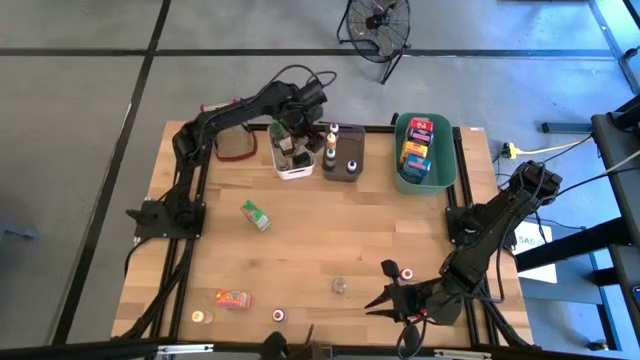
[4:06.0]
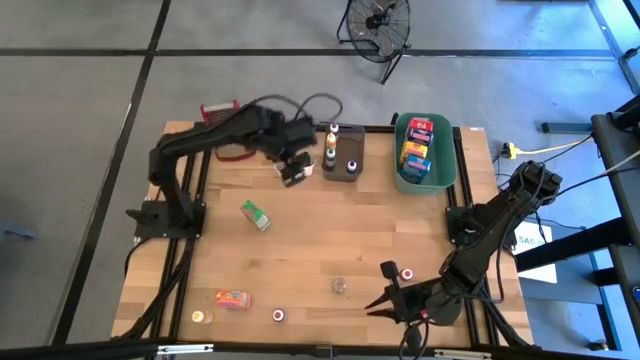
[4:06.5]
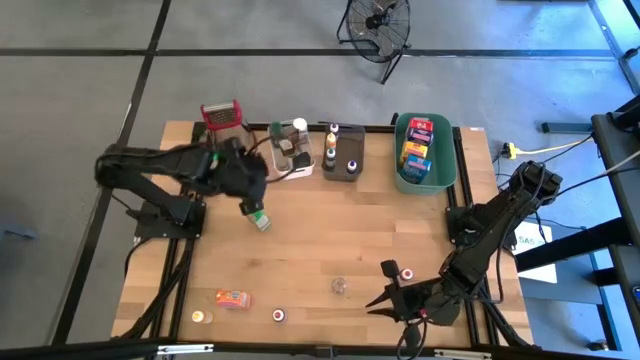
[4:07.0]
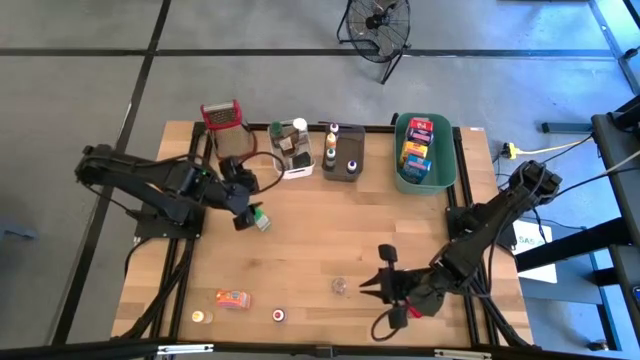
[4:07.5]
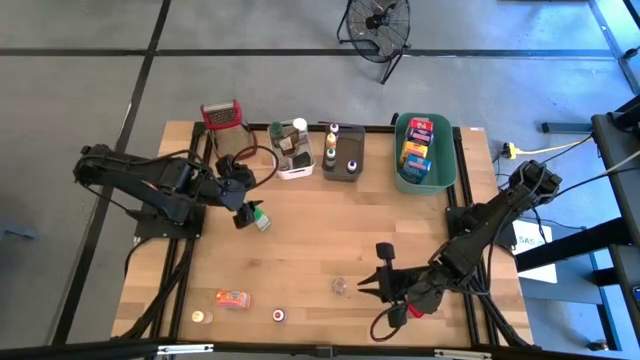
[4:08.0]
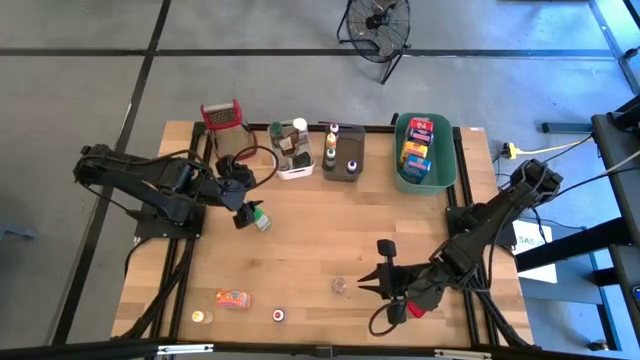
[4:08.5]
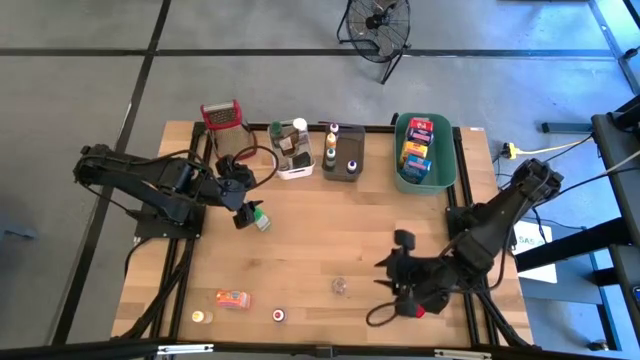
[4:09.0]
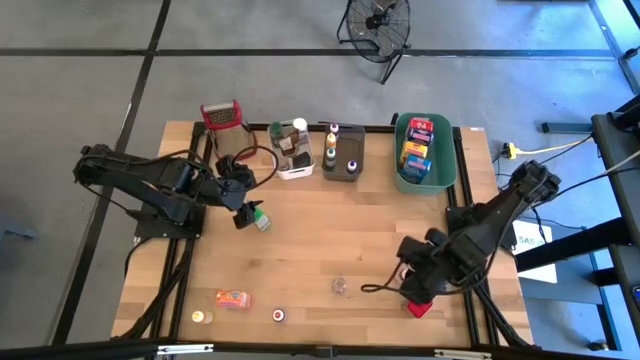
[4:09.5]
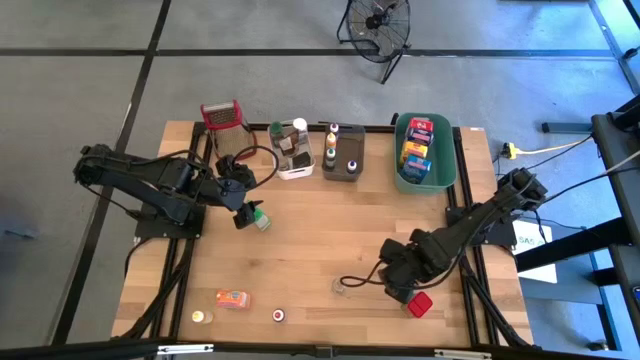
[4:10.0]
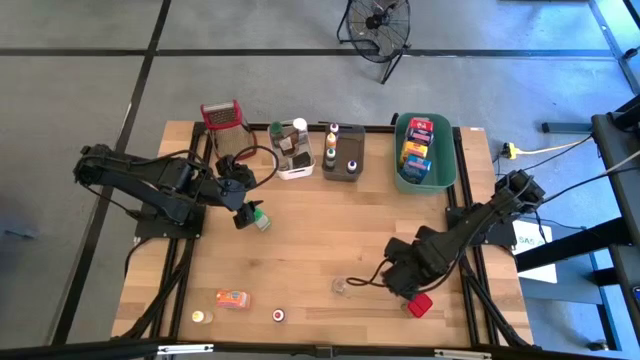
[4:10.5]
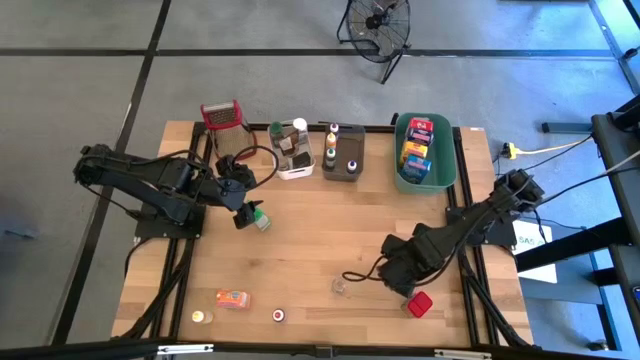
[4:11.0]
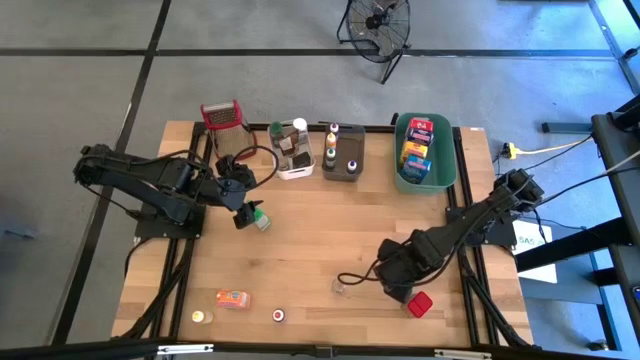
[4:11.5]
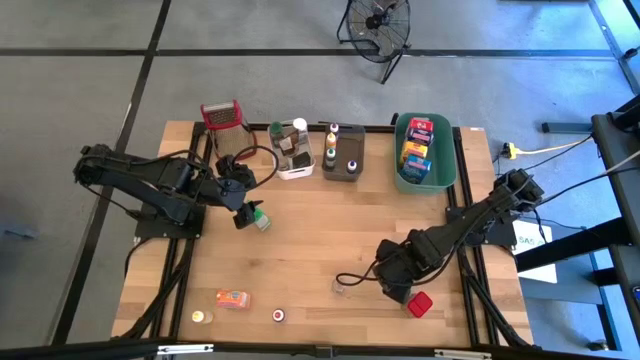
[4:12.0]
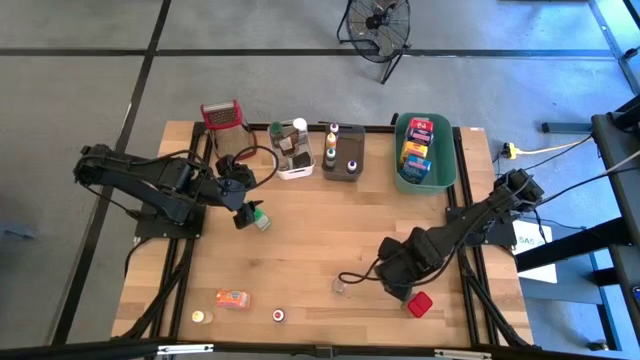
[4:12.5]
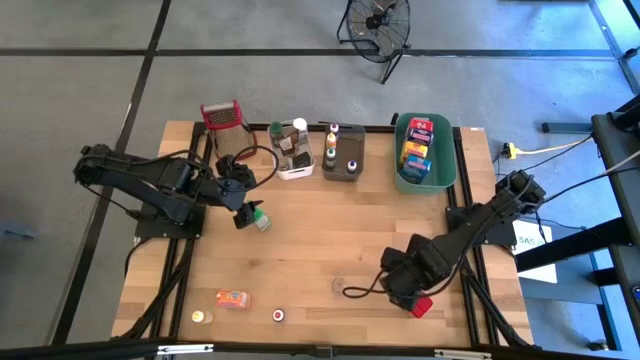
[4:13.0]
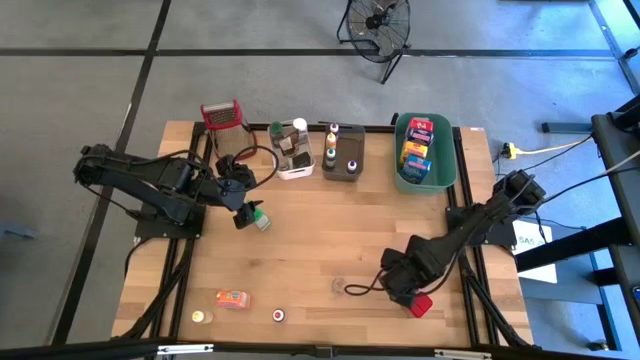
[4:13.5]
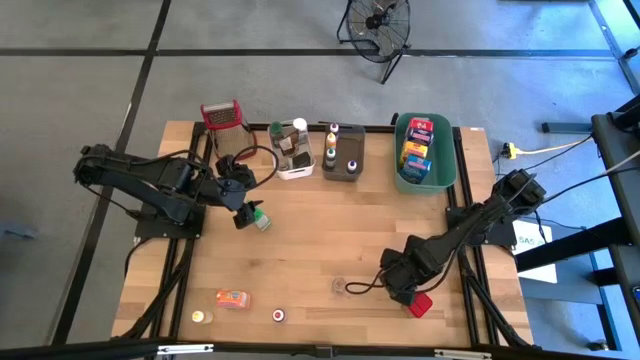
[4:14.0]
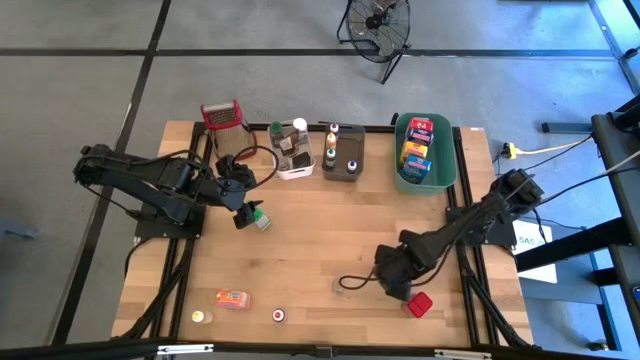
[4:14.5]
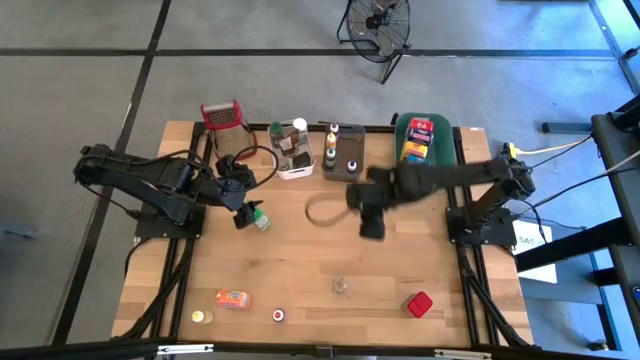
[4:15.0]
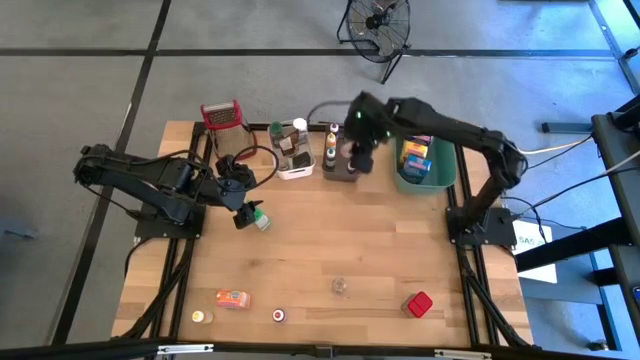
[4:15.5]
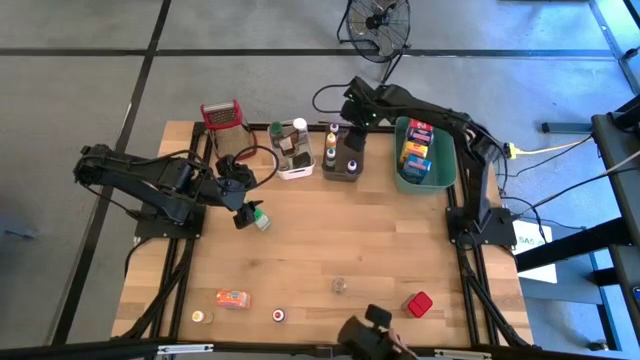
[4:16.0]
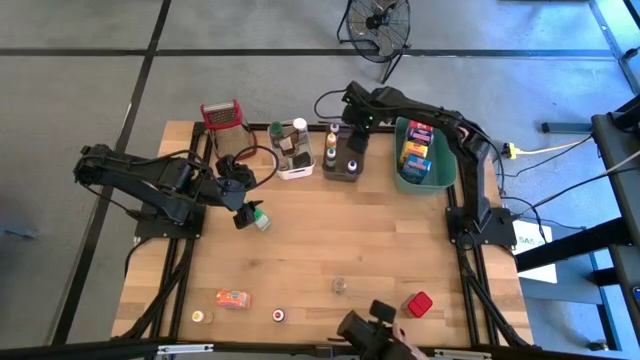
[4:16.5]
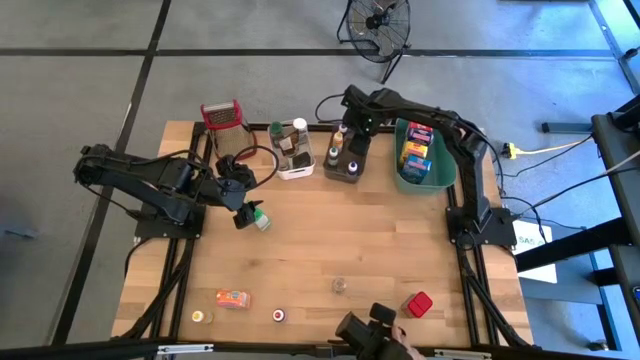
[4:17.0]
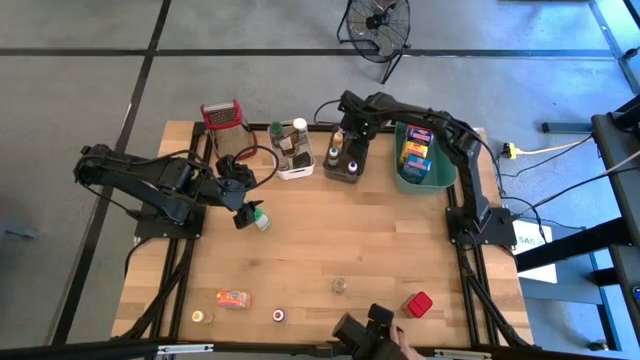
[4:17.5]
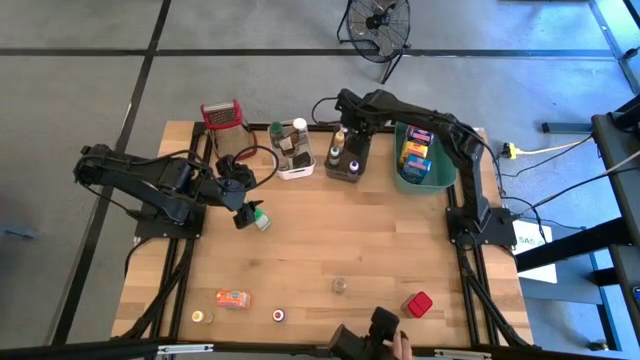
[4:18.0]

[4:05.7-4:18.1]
Task: Pick & Place Kitchen Items
Put the pink coloring bottle into the black transparent bin
